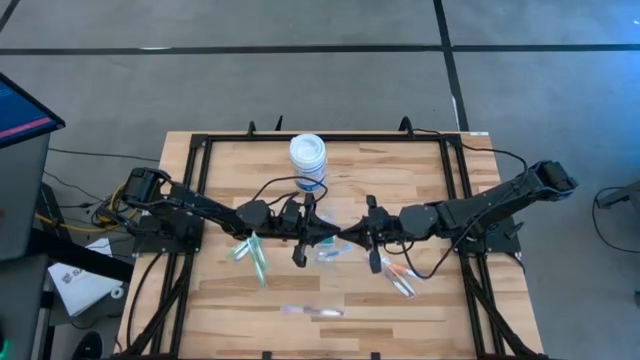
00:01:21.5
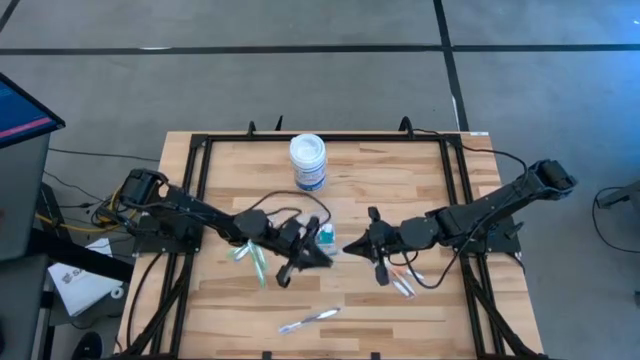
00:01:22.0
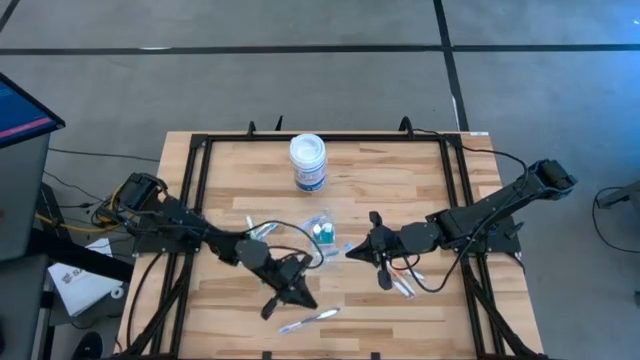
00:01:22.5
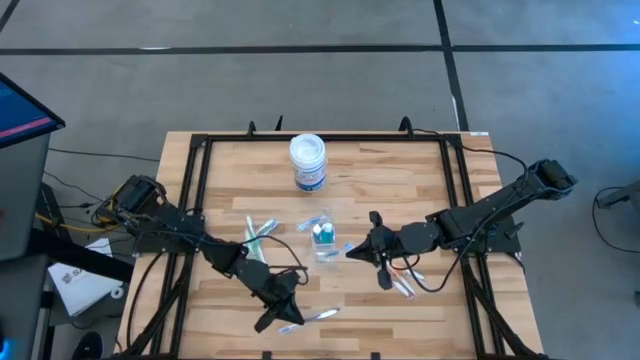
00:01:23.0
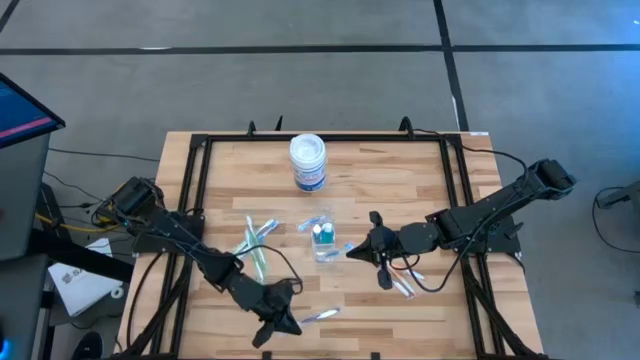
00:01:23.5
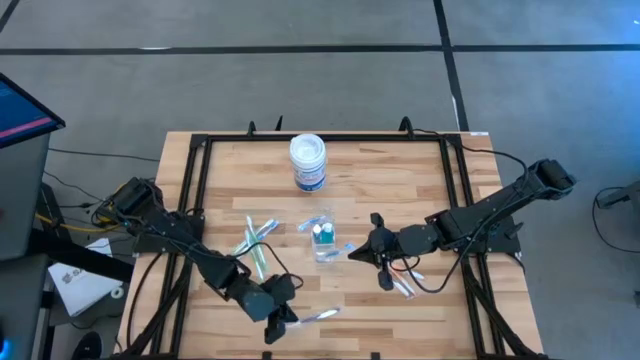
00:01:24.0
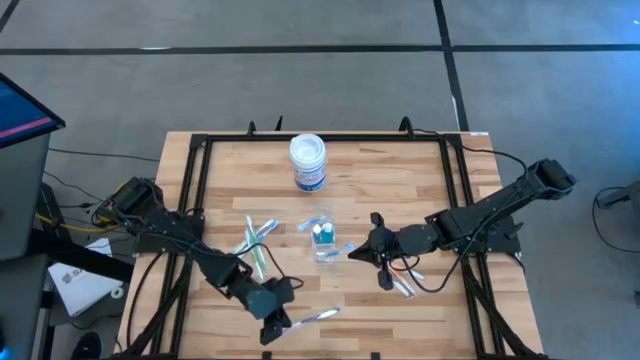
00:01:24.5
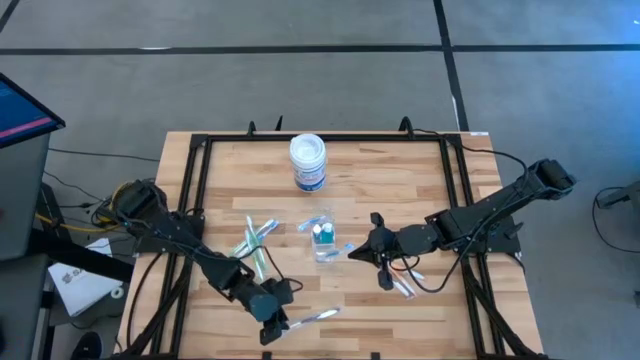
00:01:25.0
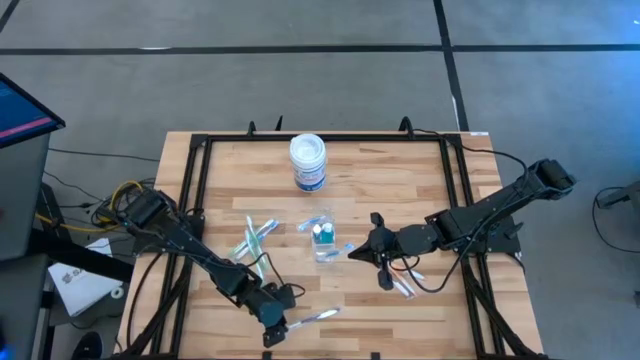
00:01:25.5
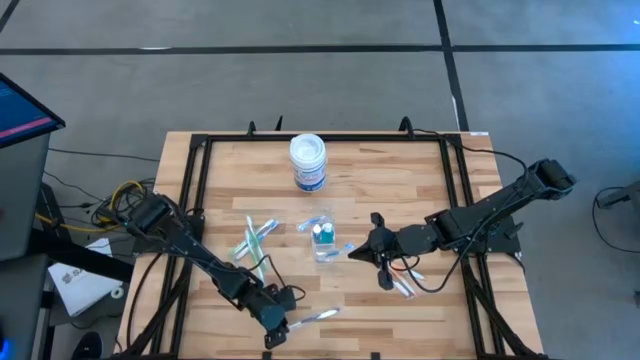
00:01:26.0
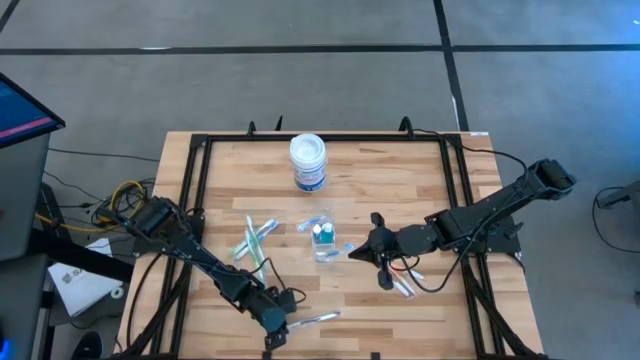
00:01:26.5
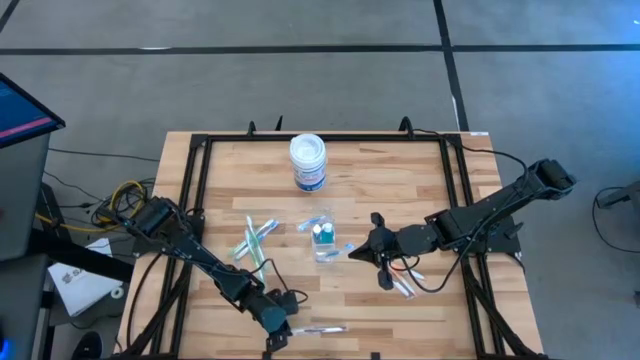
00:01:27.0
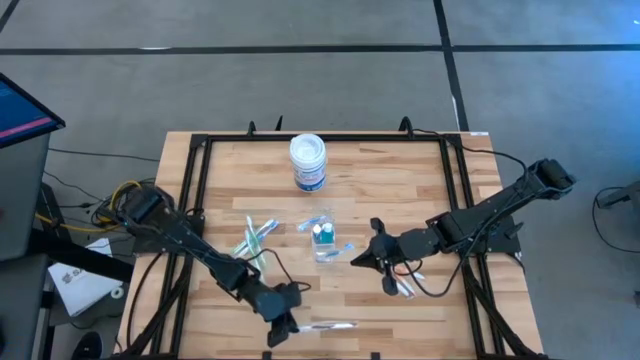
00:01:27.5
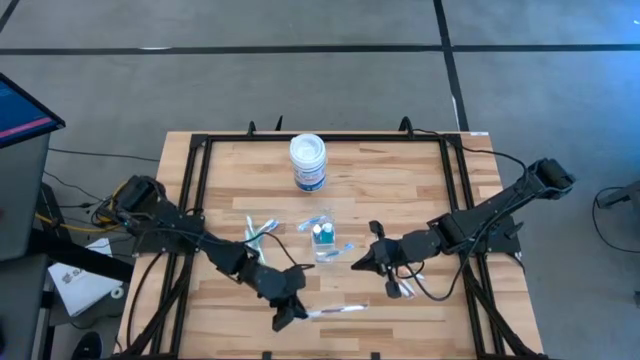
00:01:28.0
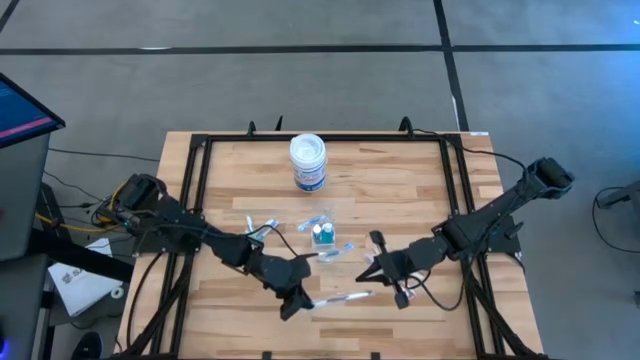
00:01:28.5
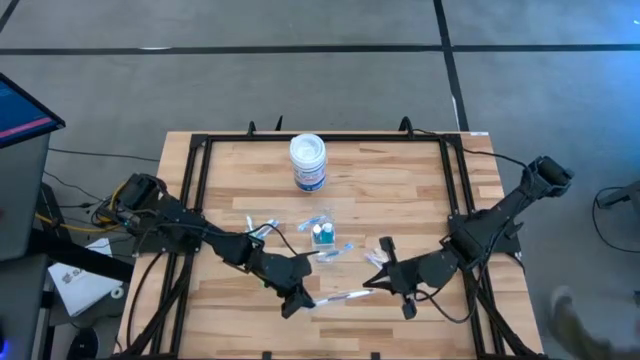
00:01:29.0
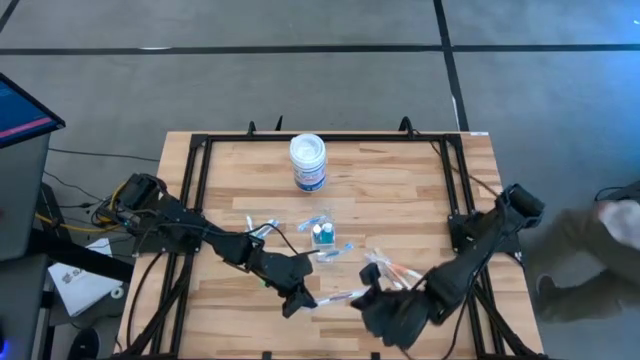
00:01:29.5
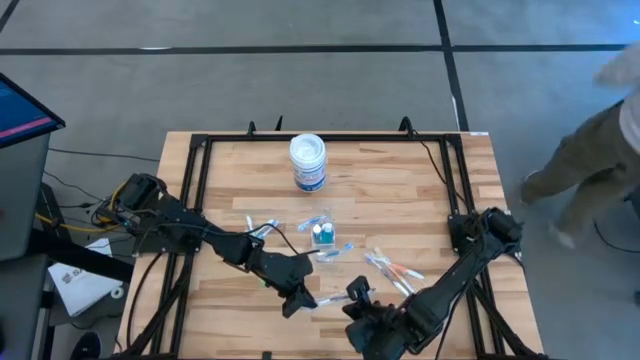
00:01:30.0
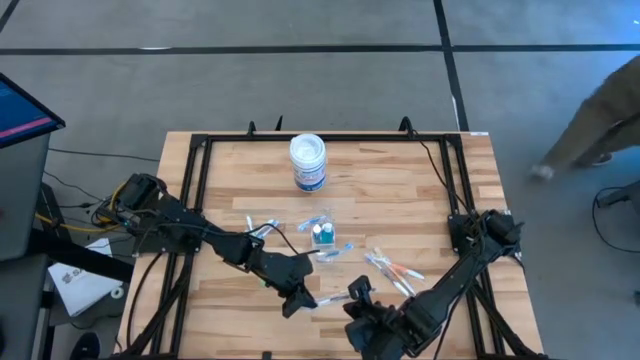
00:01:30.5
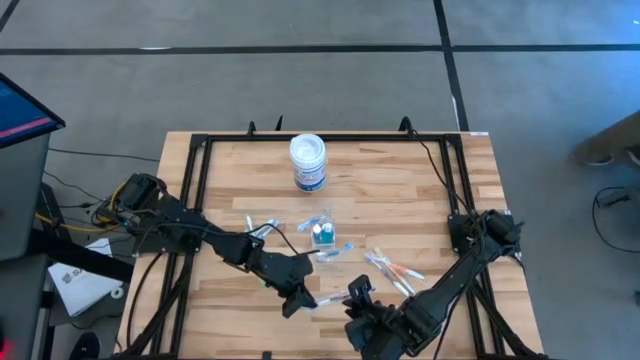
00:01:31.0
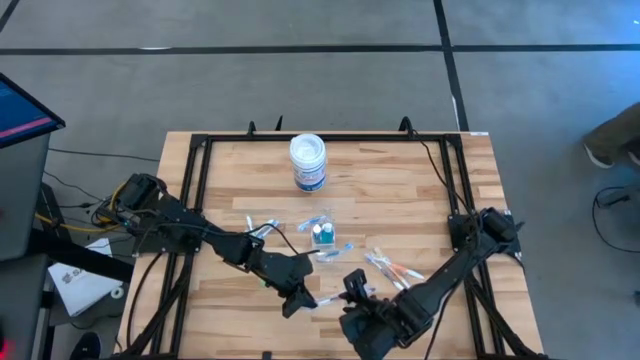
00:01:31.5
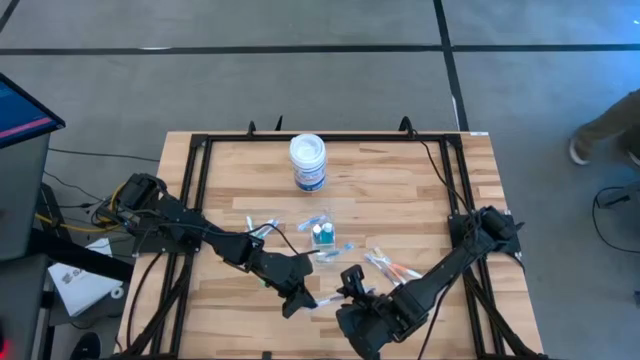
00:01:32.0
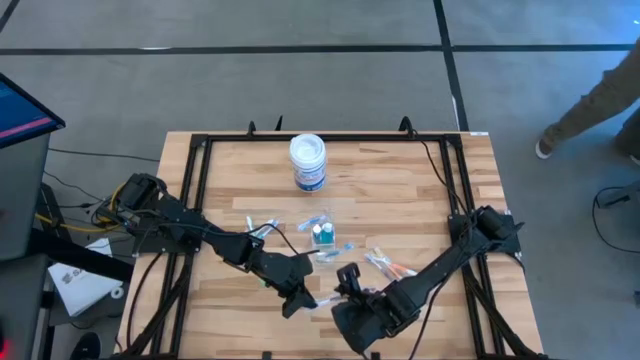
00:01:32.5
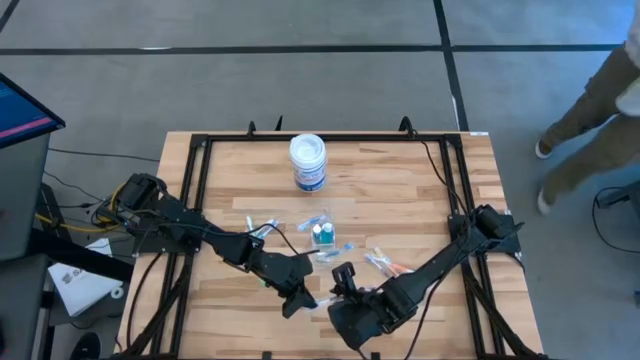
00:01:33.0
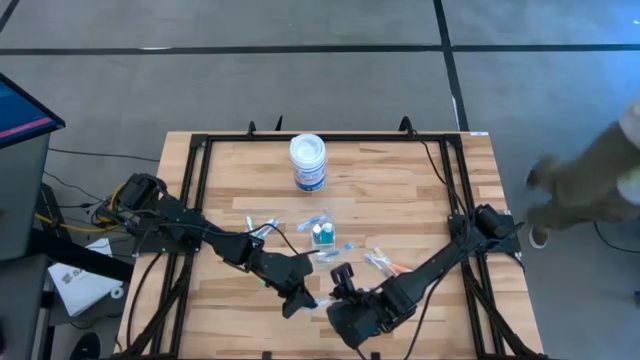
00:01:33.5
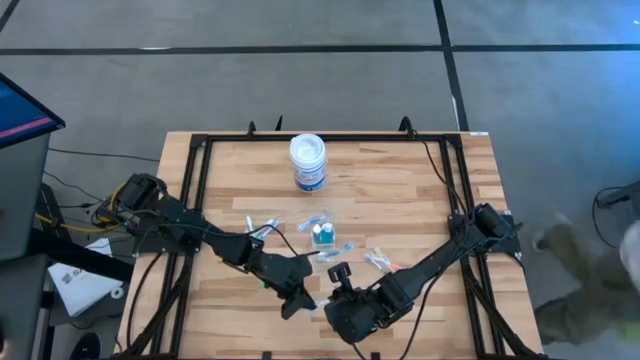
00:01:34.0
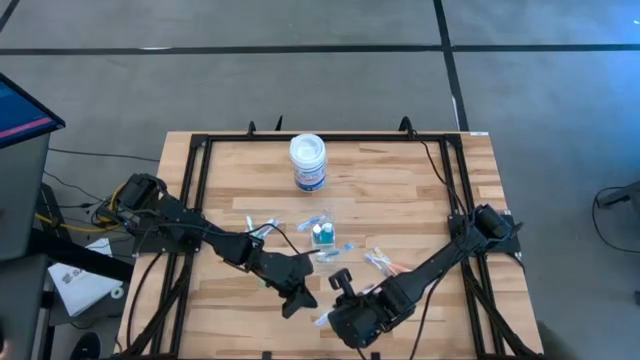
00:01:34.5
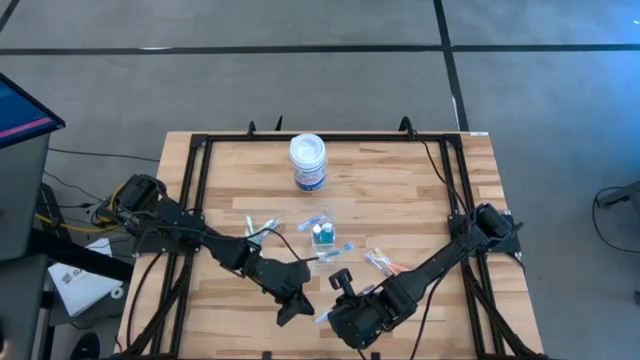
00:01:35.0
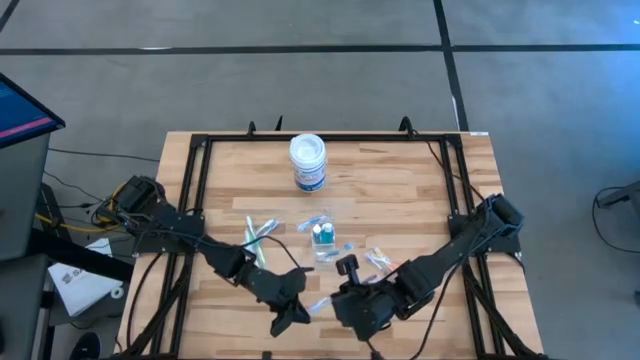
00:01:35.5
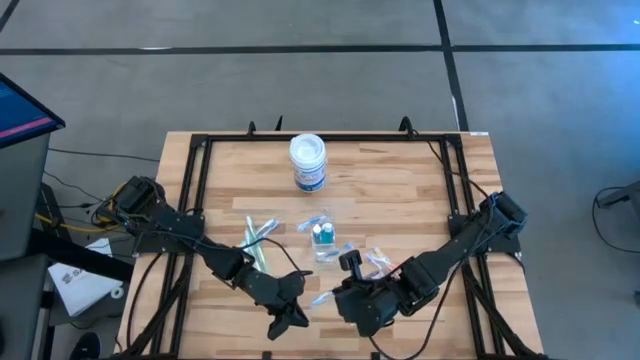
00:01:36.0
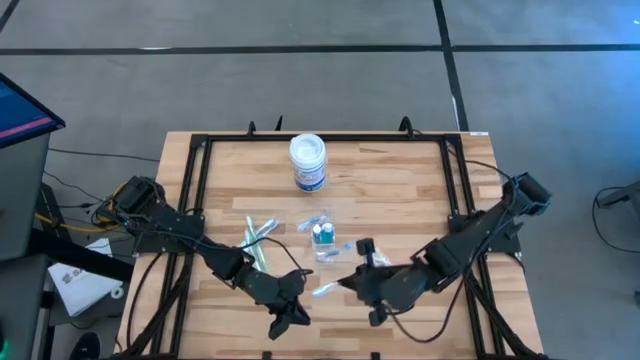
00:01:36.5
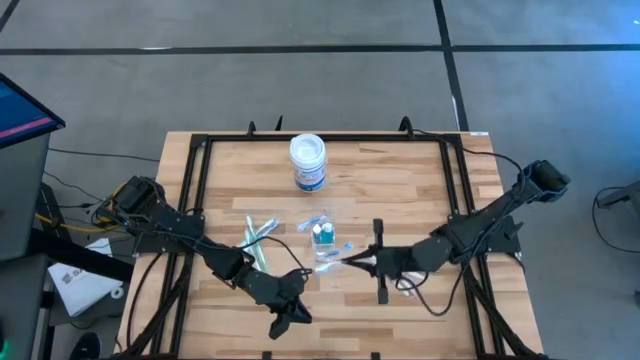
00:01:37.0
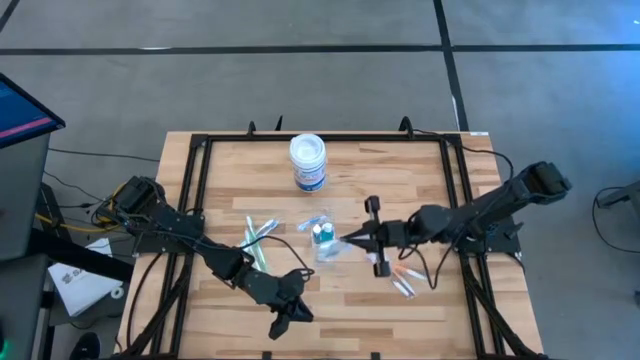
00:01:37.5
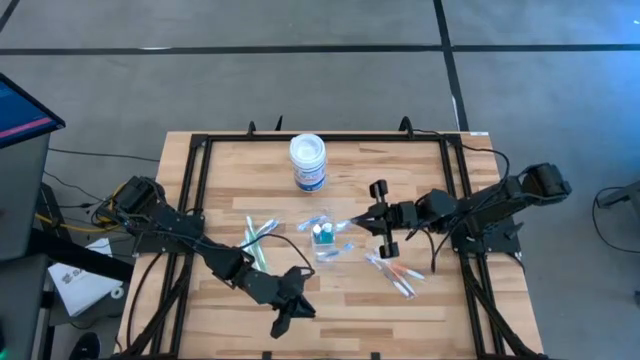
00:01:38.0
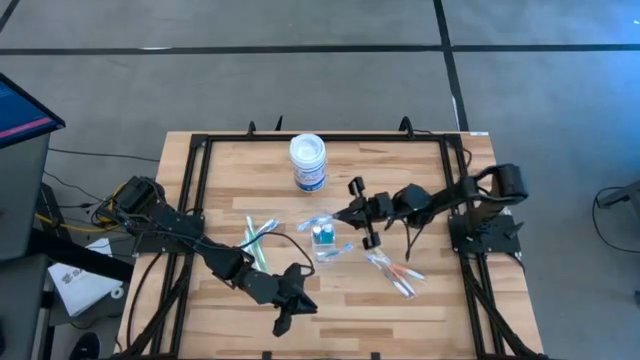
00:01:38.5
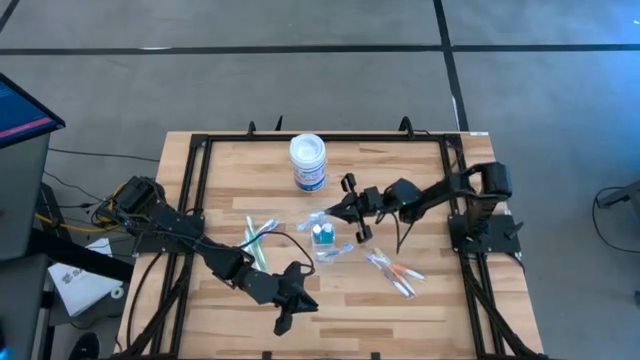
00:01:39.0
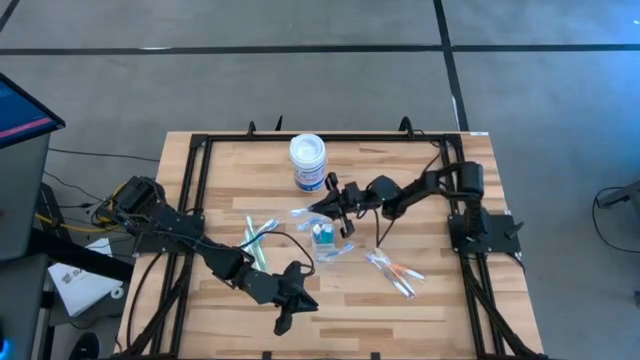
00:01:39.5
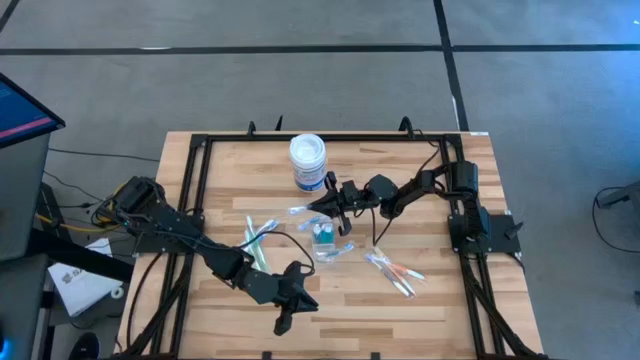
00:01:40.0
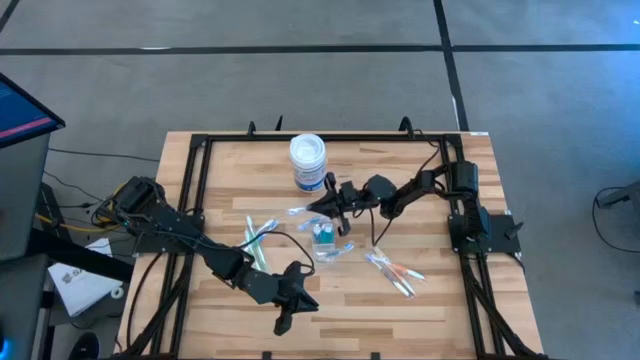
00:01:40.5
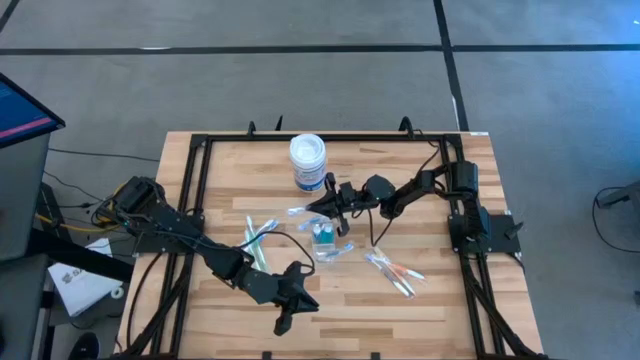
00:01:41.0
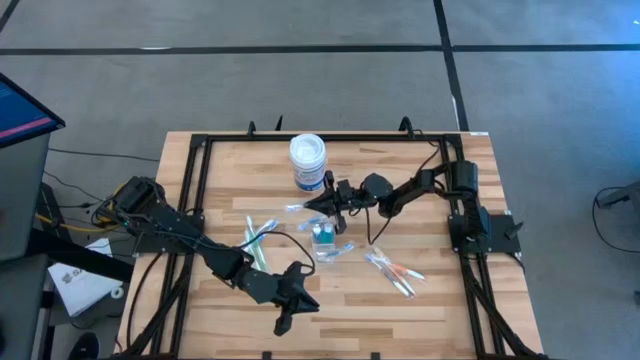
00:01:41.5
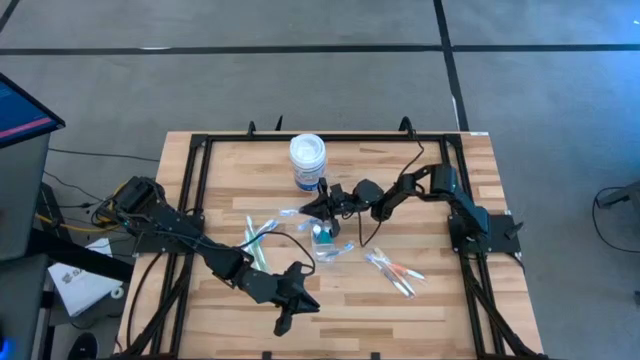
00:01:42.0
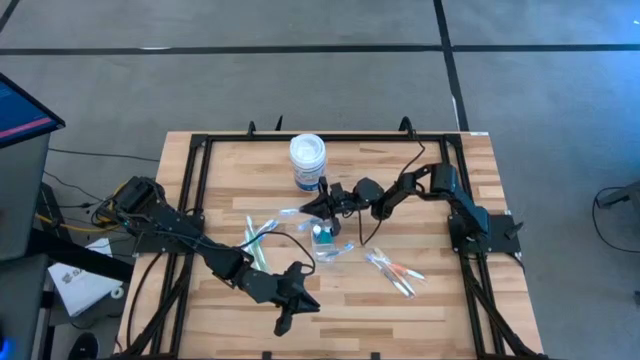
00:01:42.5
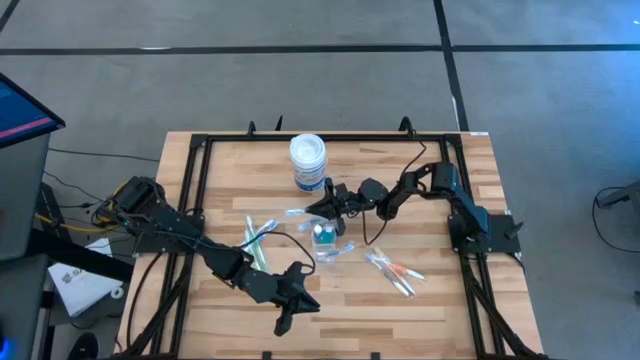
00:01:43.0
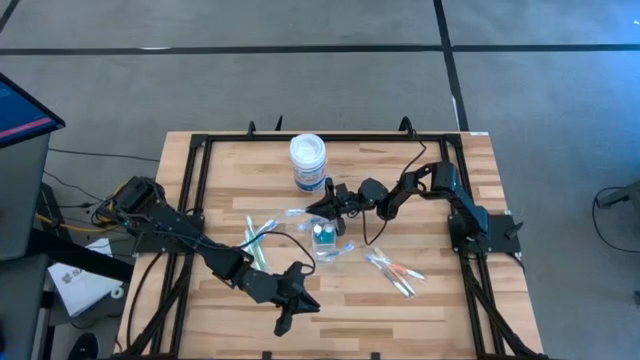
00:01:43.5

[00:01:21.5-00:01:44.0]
Task: Pick & Place toothbrushing station
Put the right purple toothbrush into the Transparent organizer
